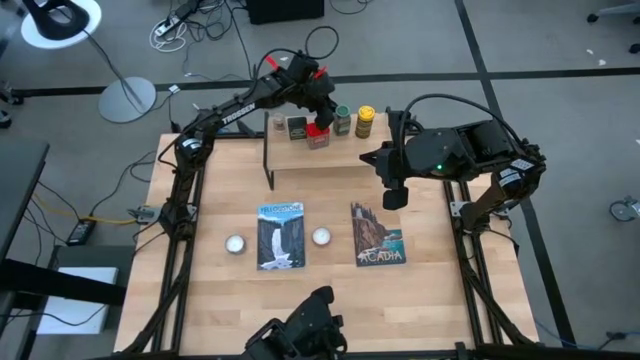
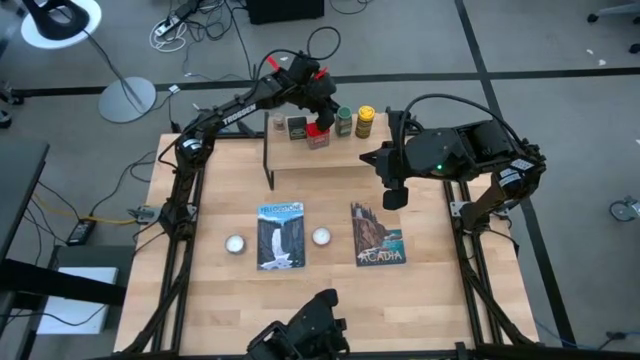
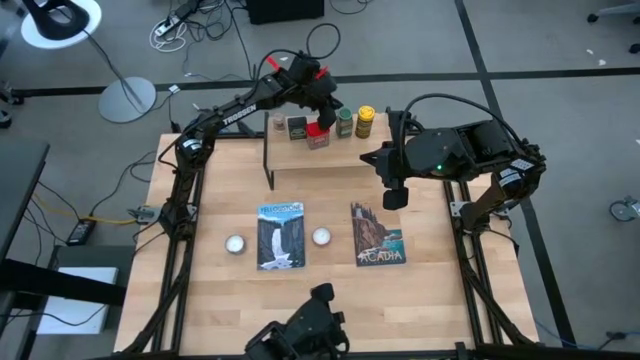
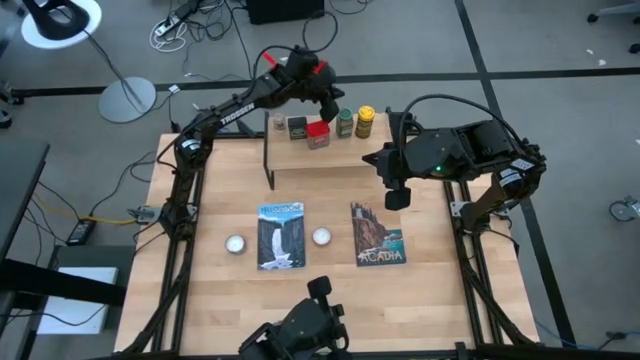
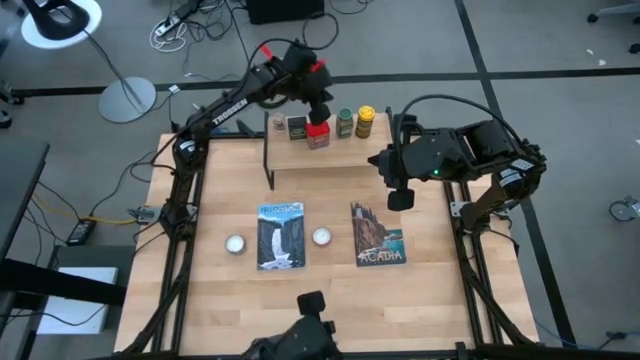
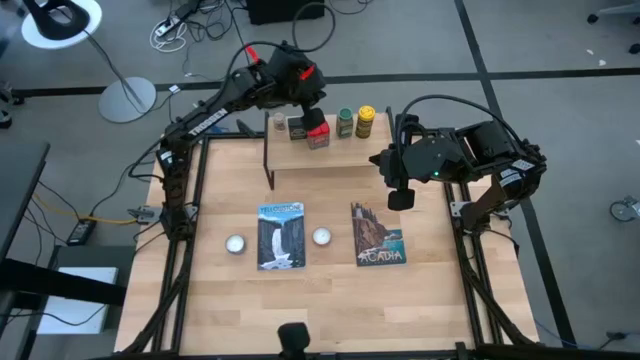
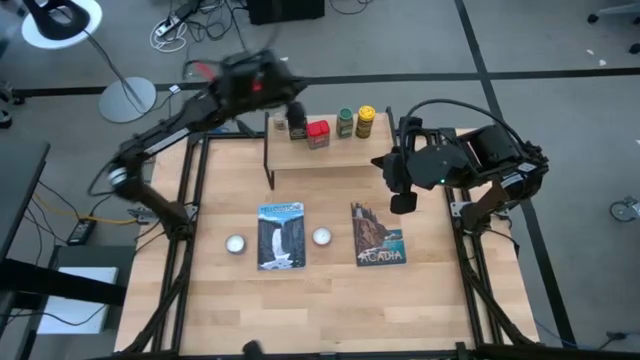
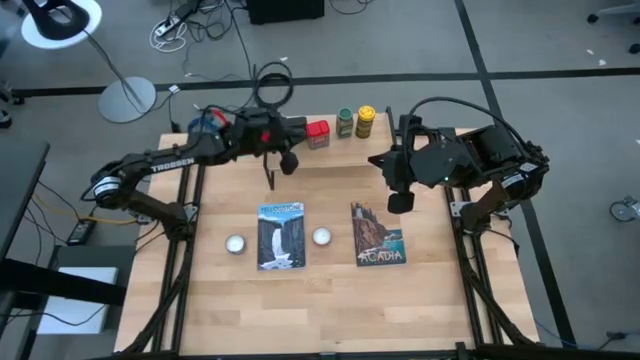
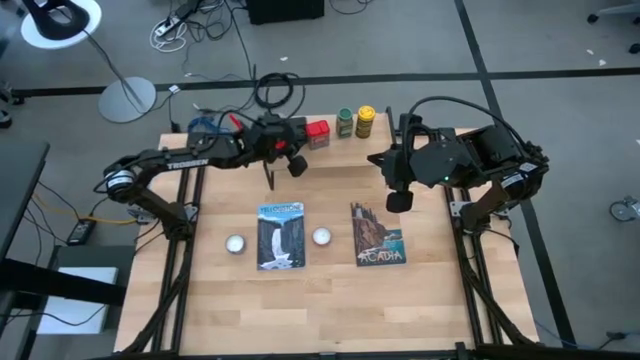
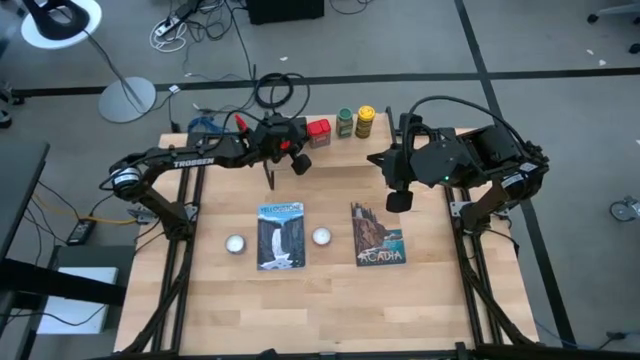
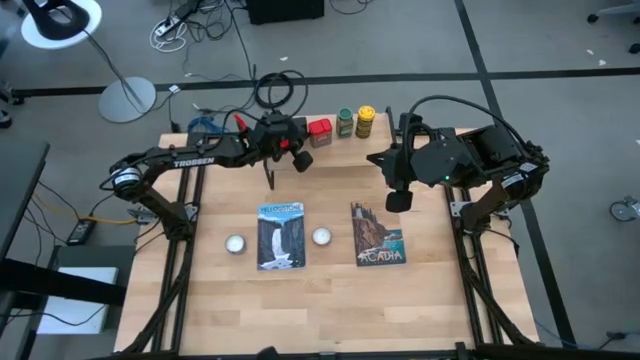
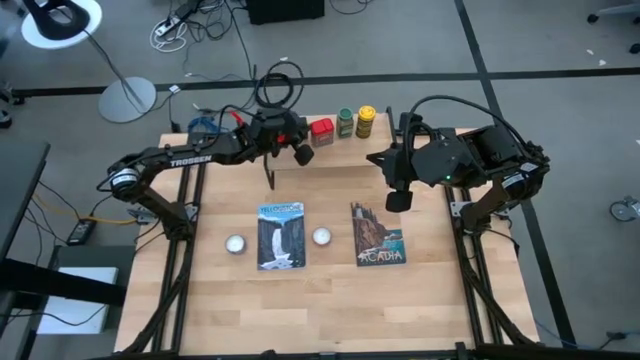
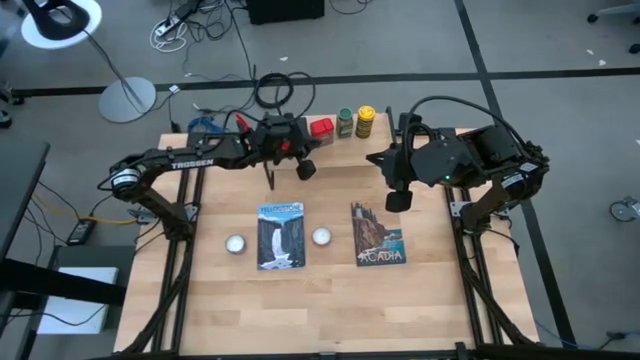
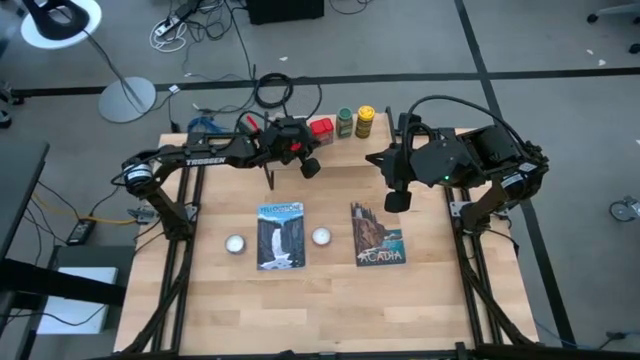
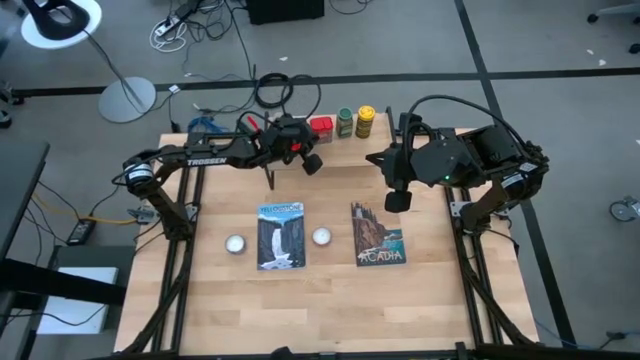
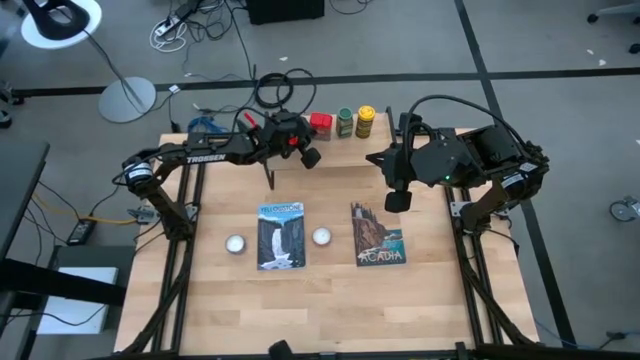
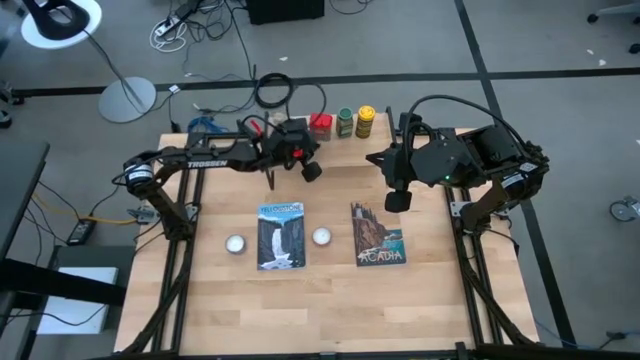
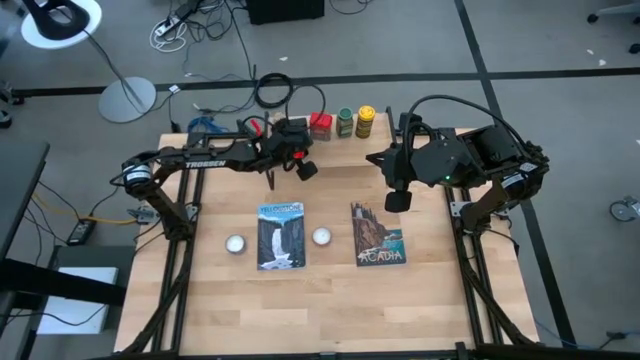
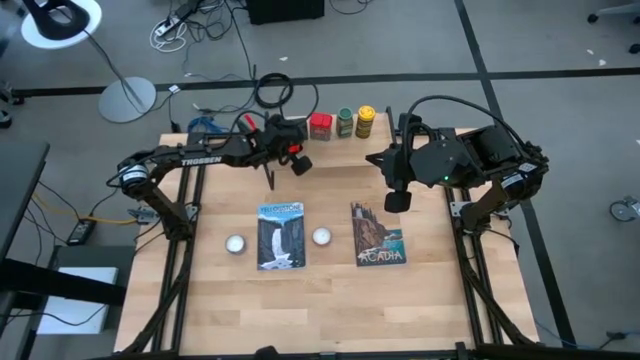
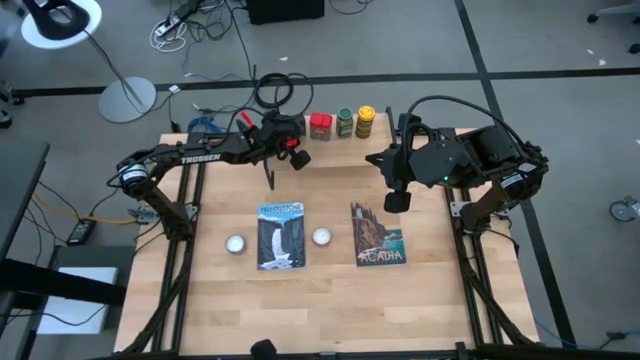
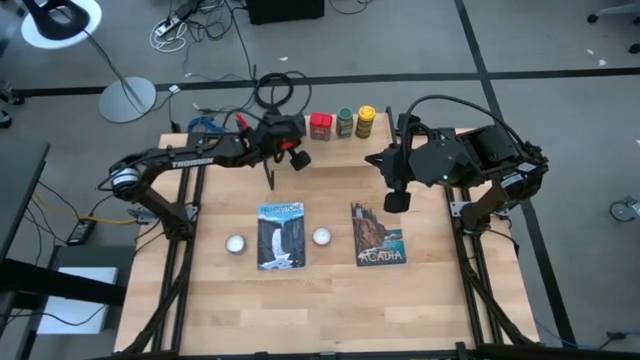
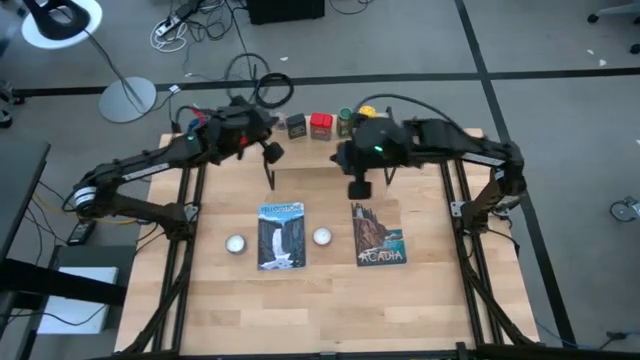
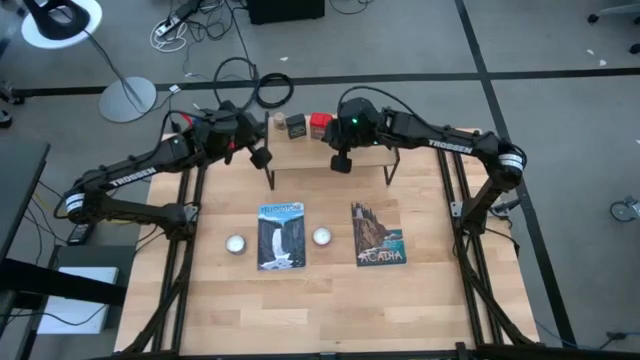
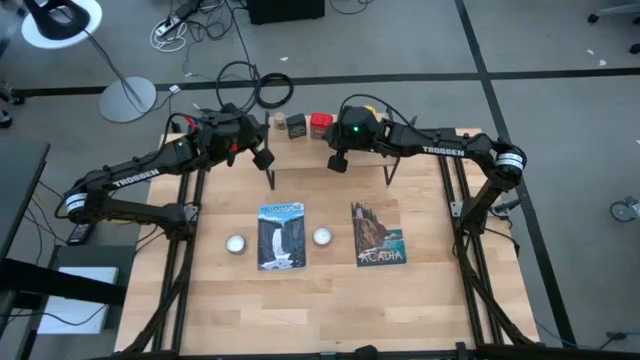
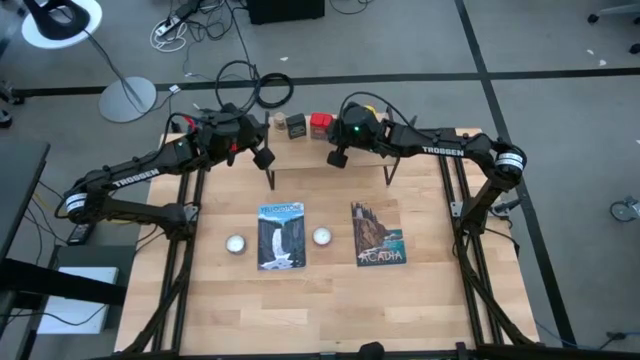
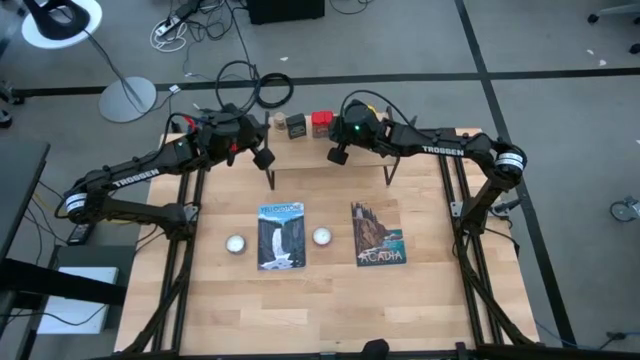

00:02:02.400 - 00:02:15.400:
Task: Shelf spices
Put the red spice on the shelf between the black and green spices

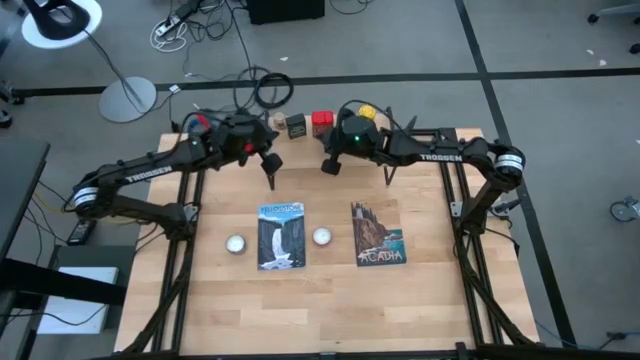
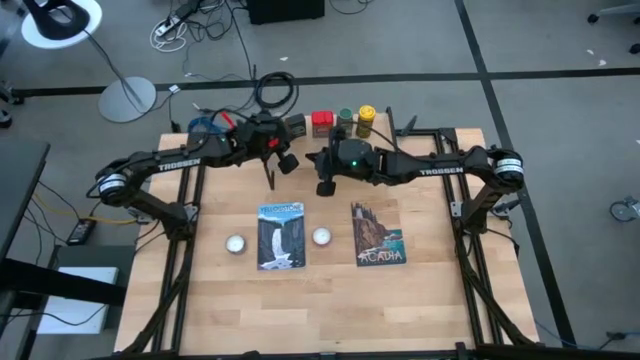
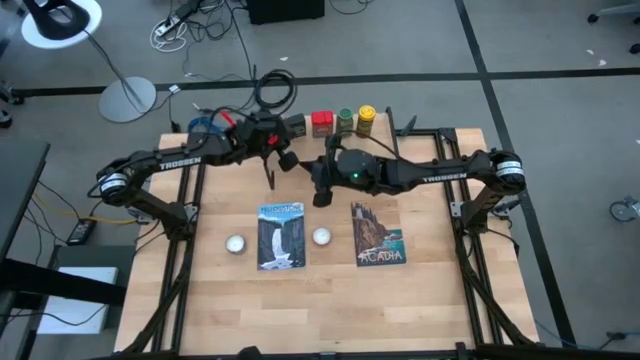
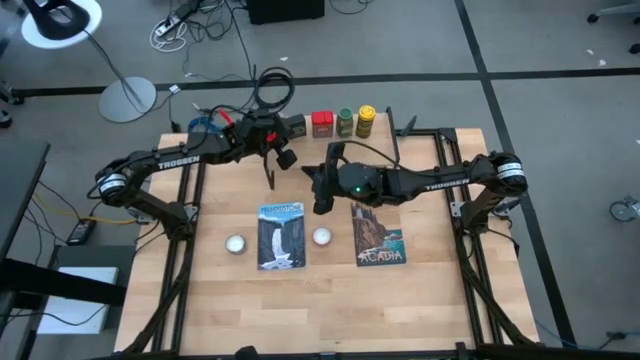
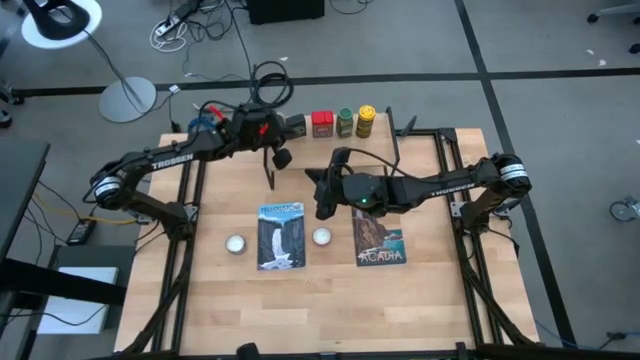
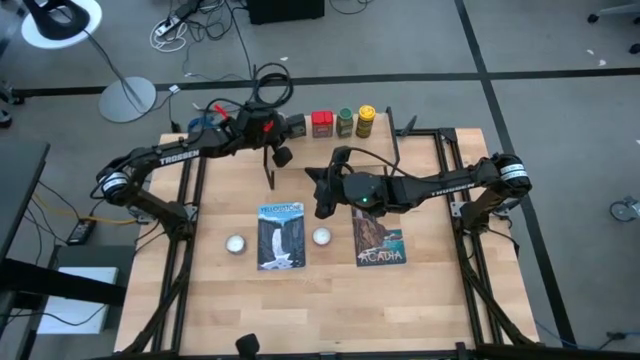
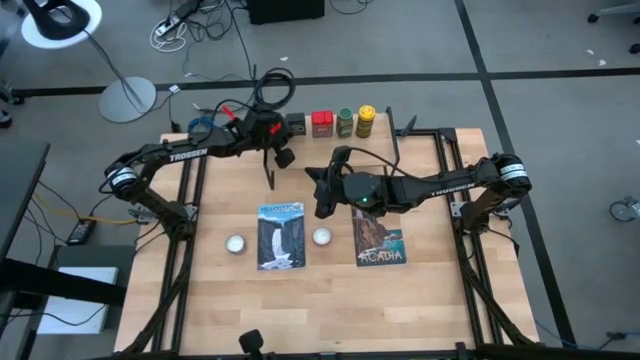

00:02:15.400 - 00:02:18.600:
Adjust the black spice

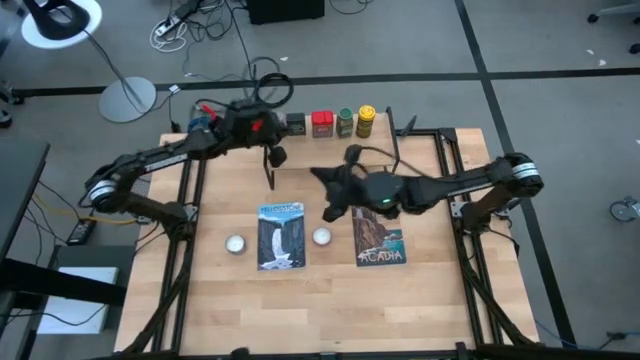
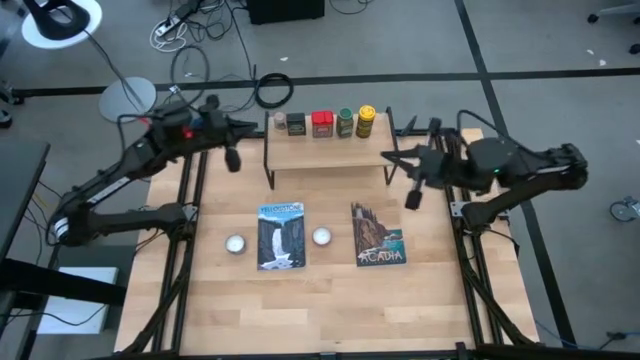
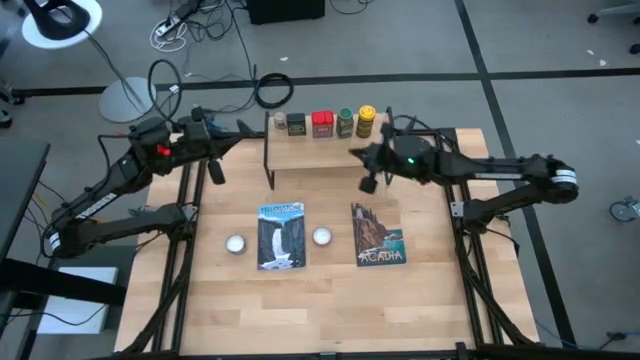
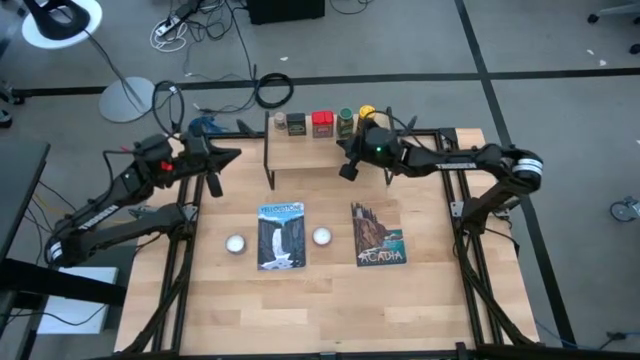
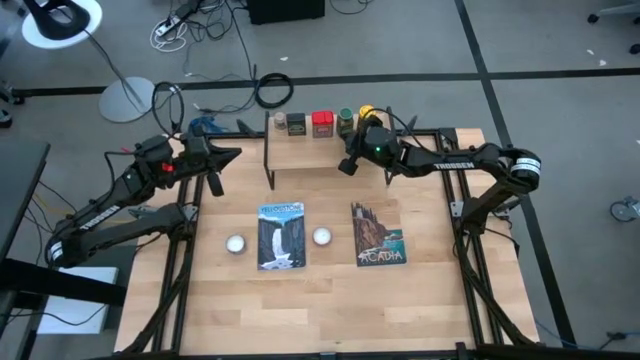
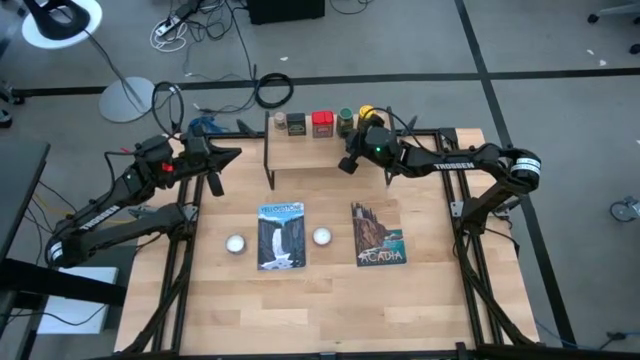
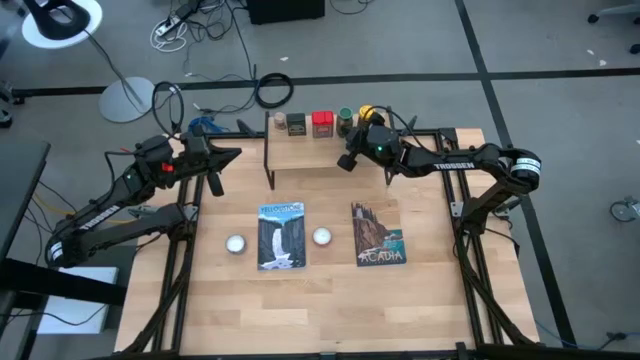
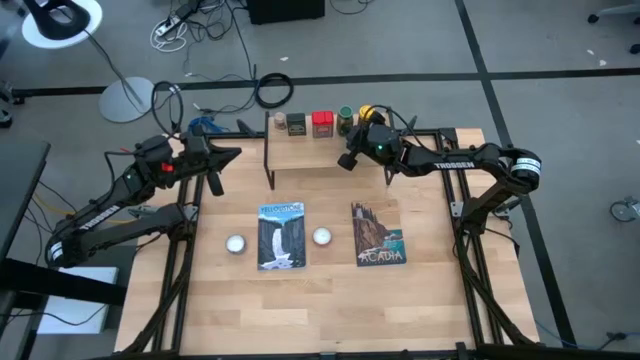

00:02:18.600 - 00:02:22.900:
Adjust the green spice

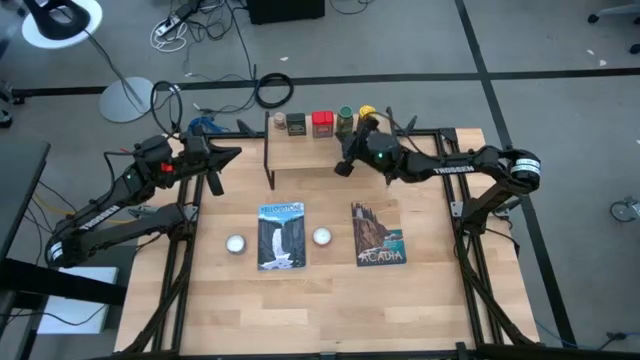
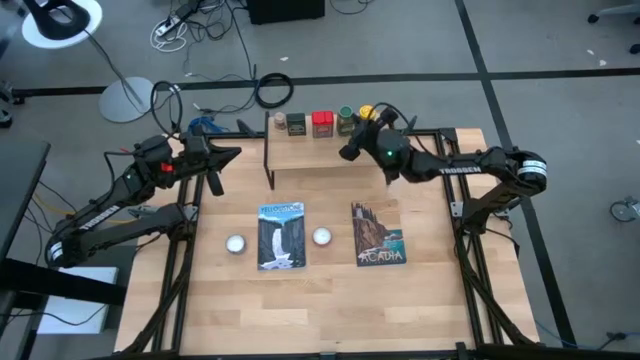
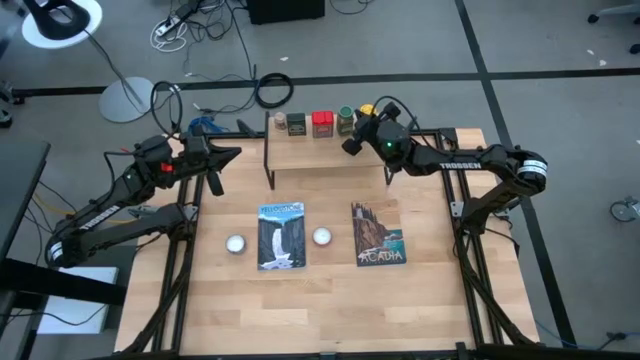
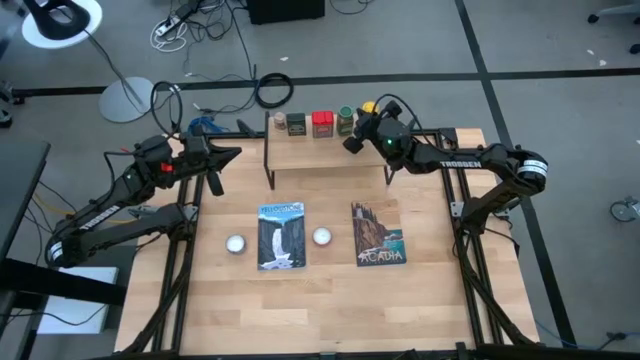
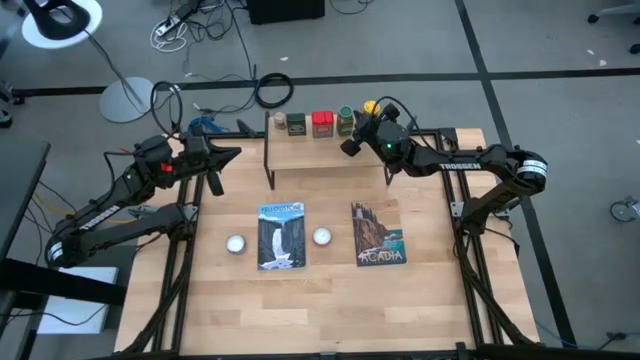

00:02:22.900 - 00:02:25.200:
Adjust the yellow spice
